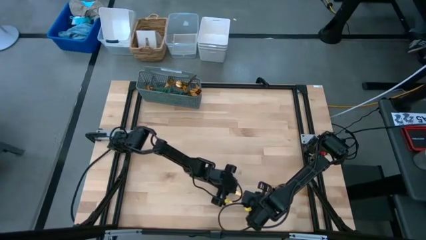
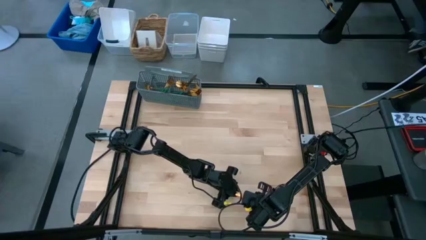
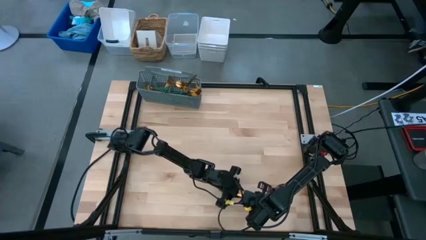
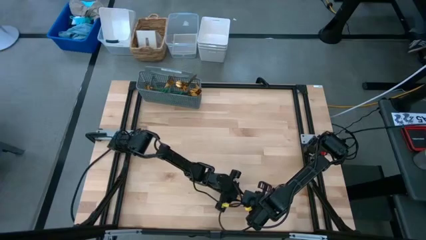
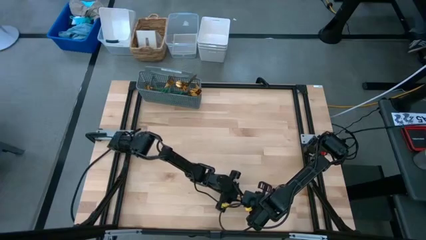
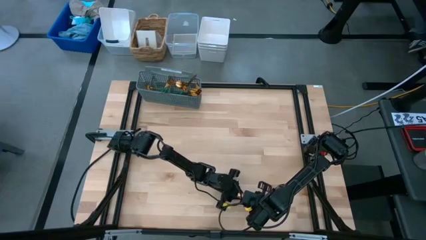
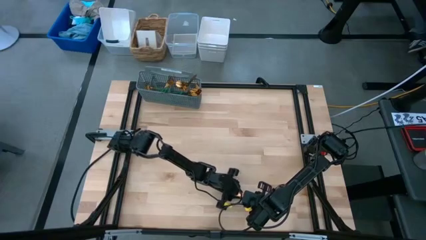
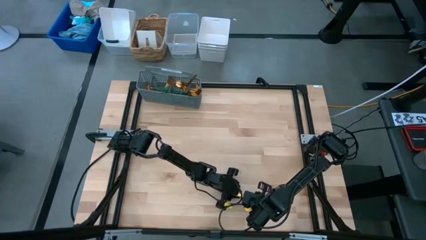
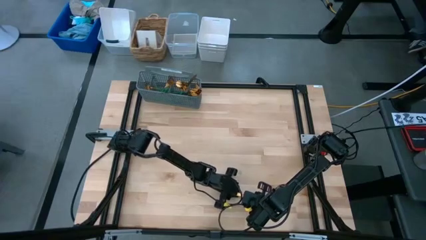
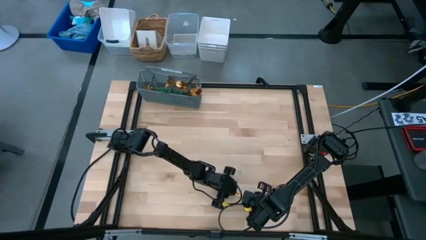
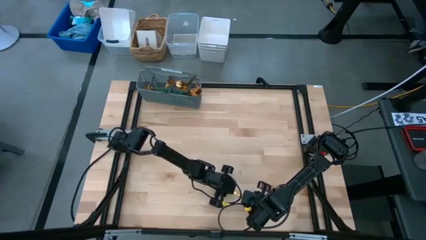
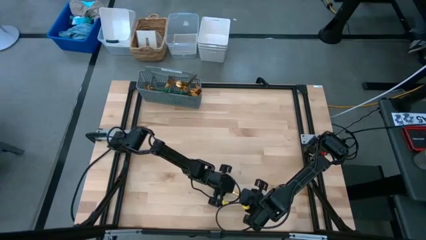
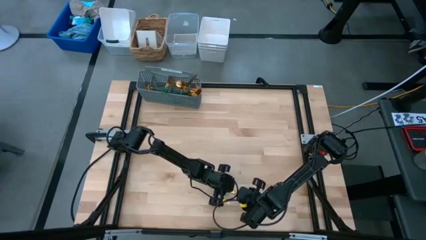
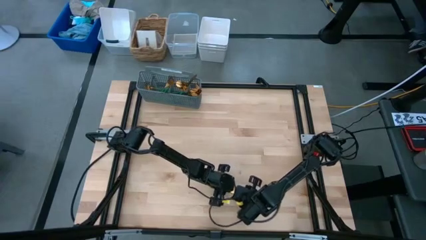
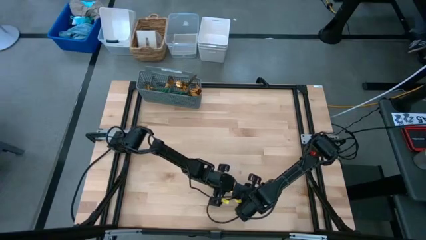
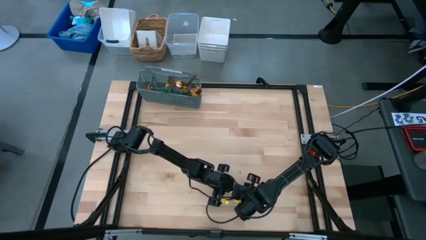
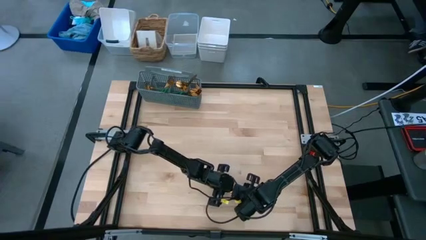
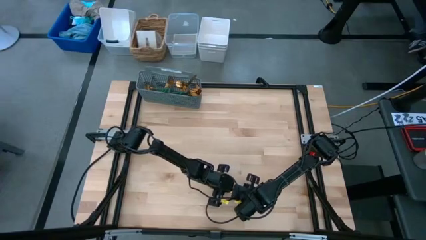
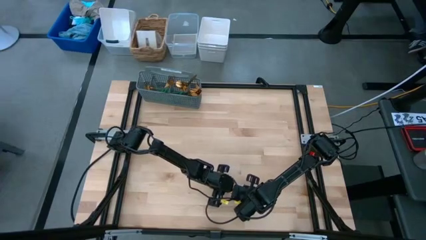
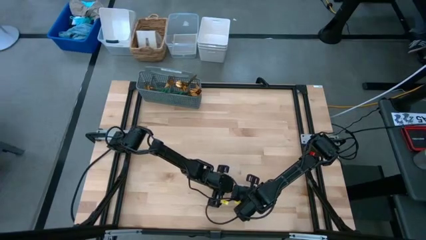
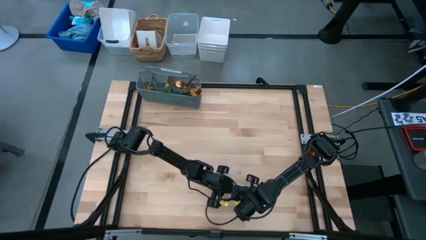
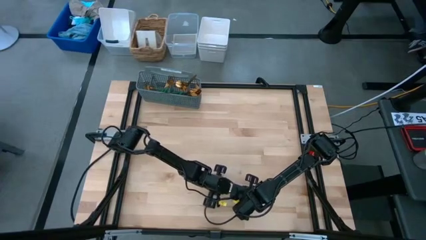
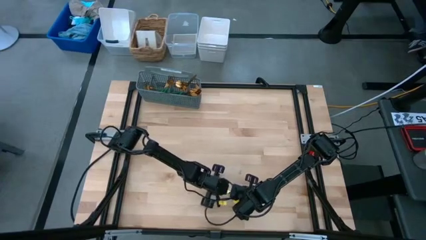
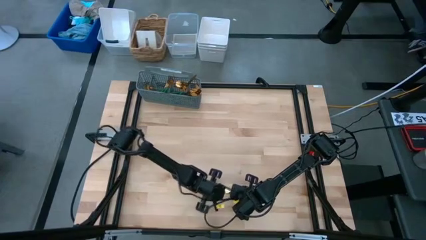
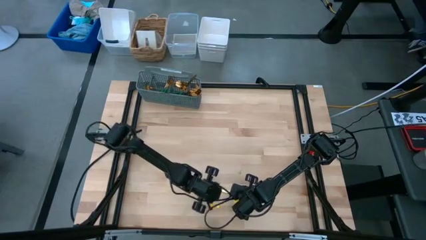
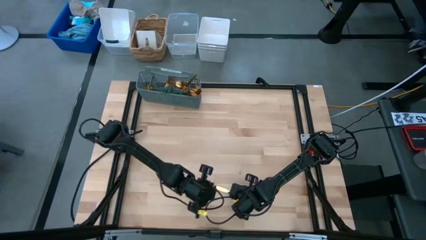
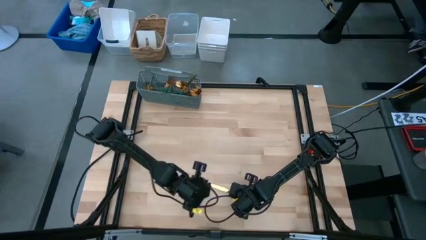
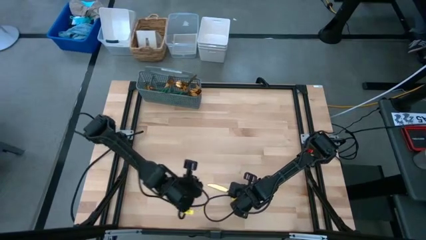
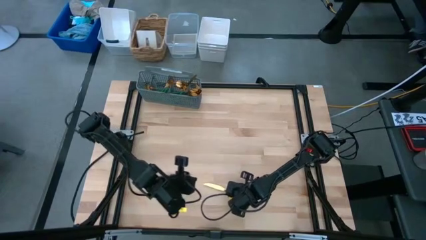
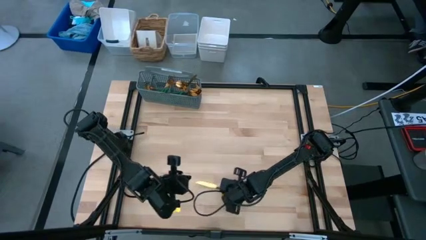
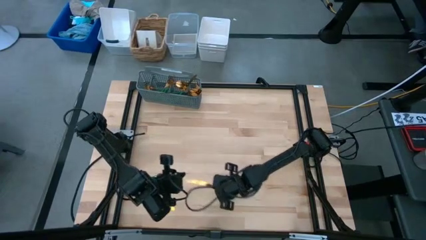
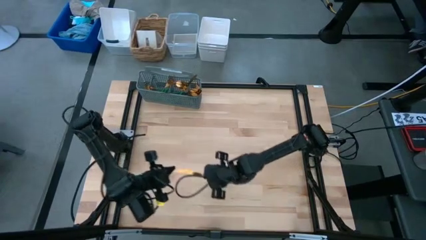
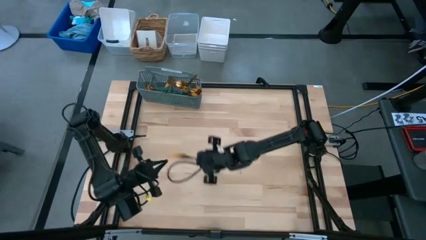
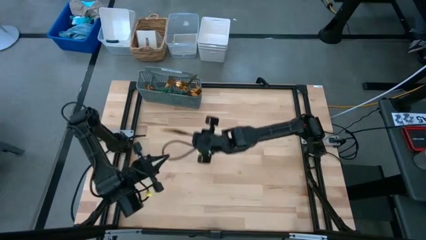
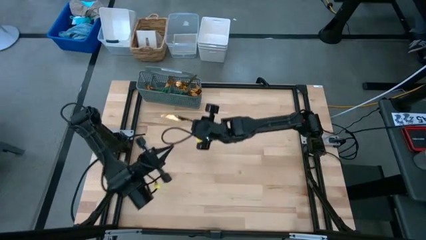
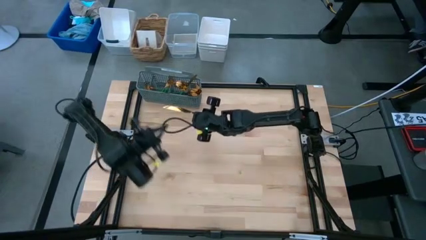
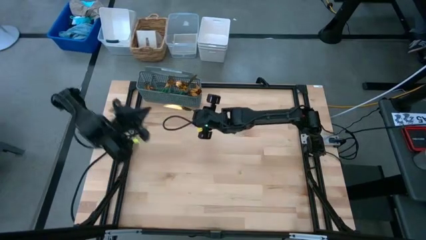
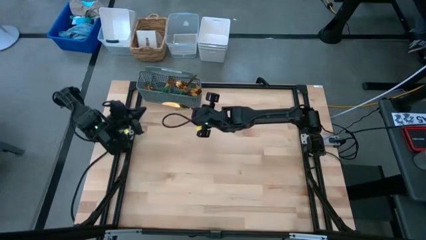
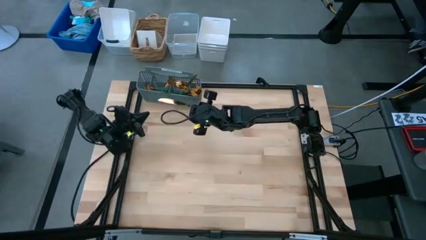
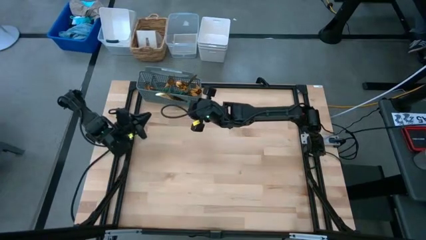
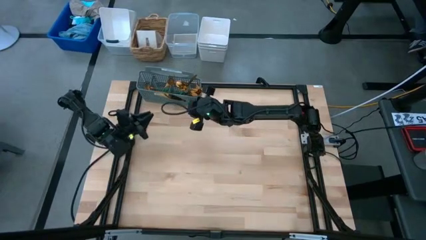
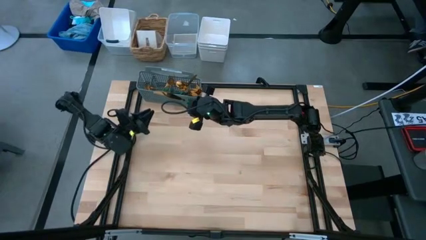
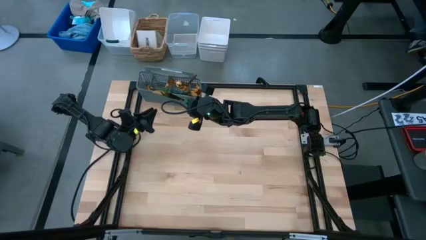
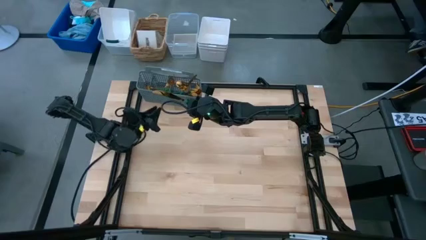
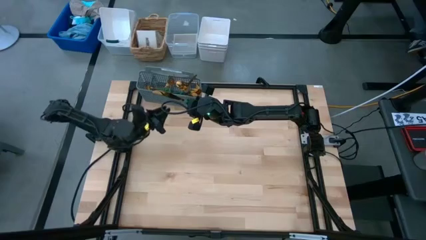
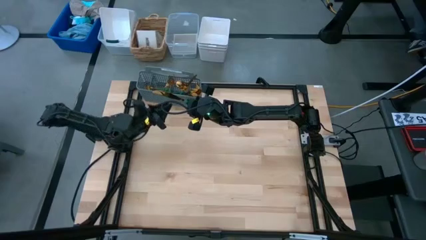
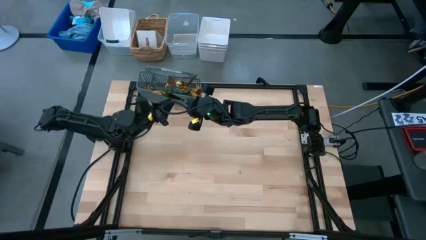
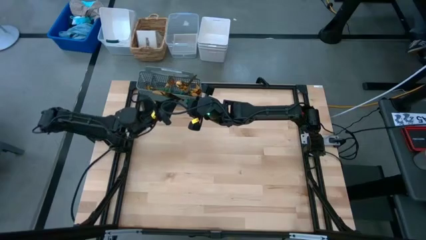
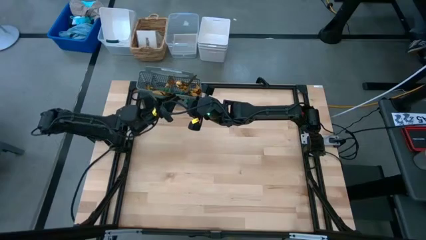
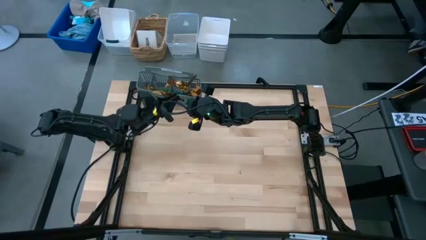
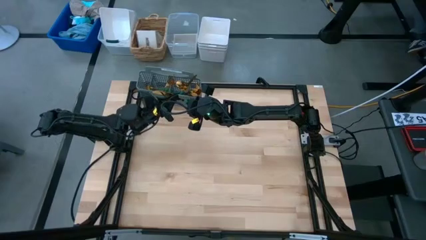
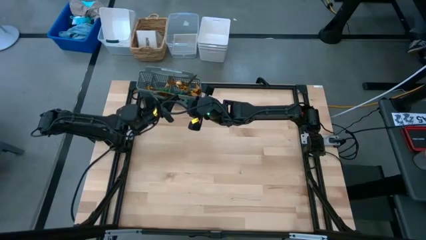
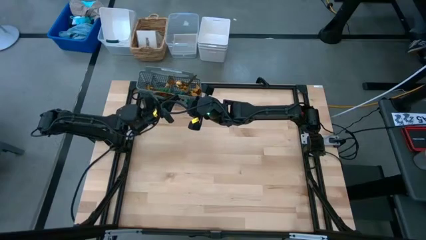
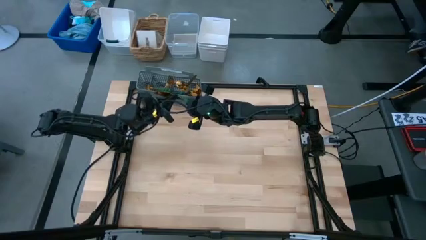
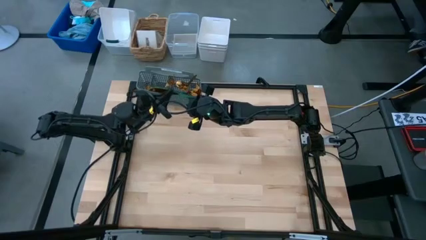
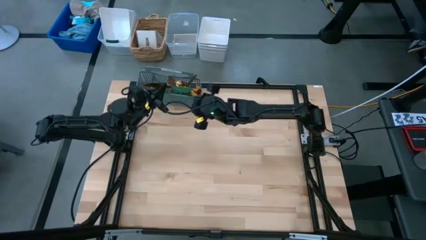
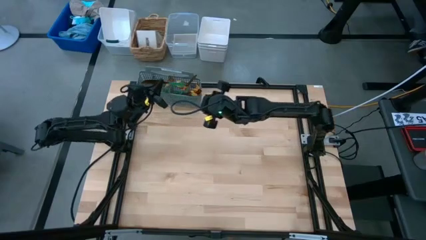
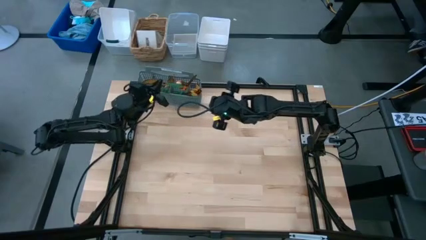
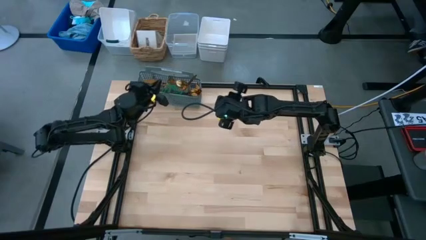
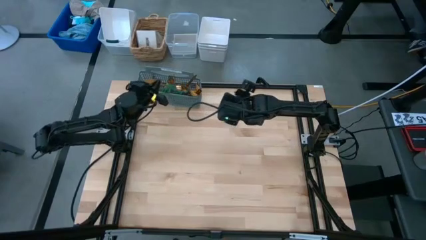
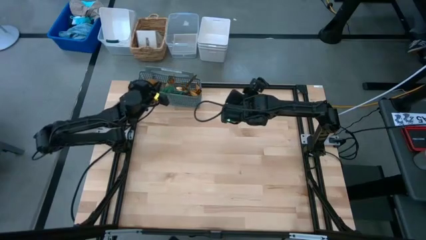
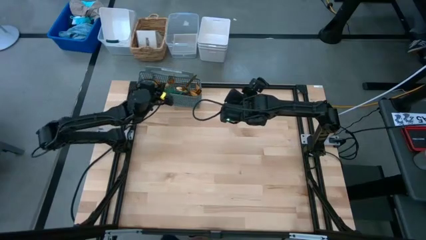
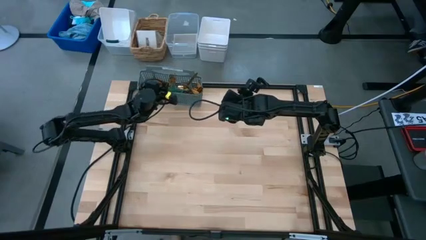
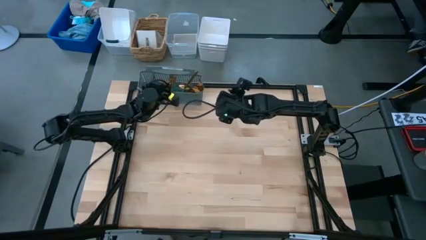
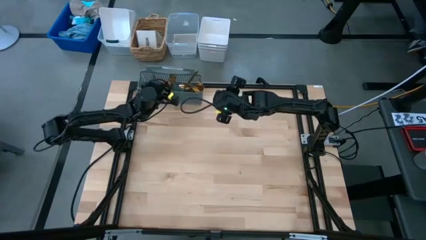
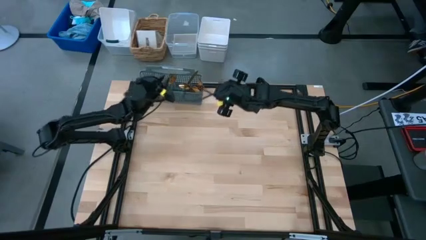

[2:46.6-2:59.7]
Task: Sort silverware
Put the green knife into the gray silverware basket

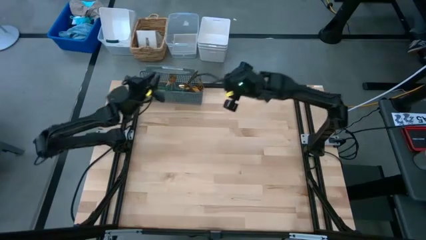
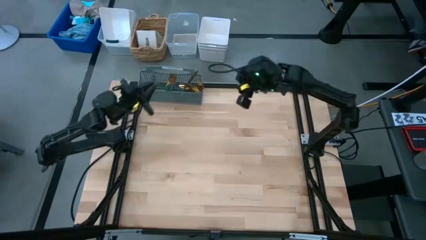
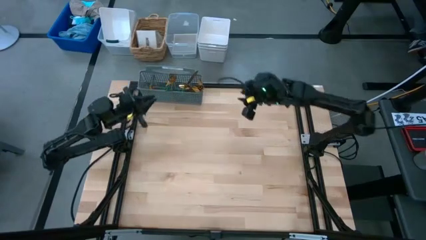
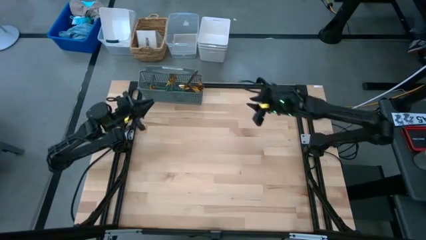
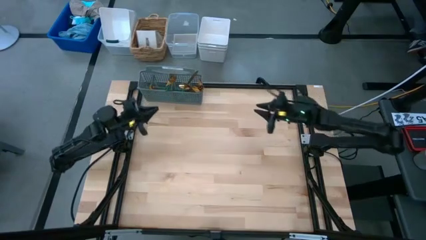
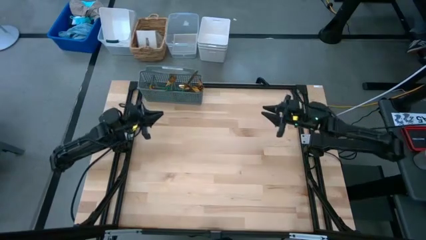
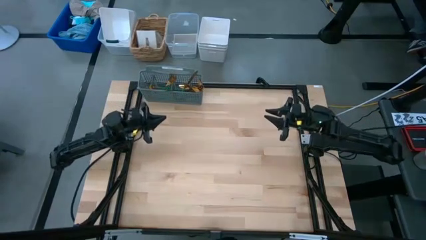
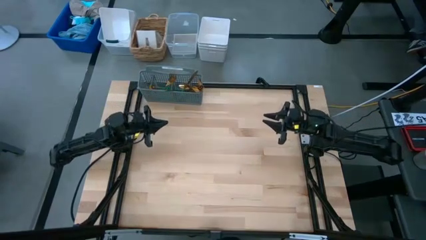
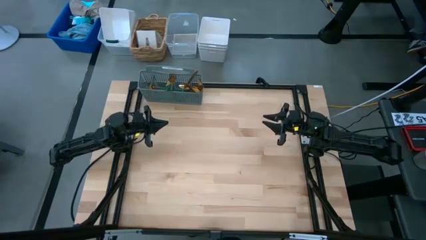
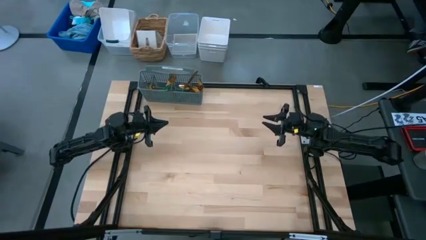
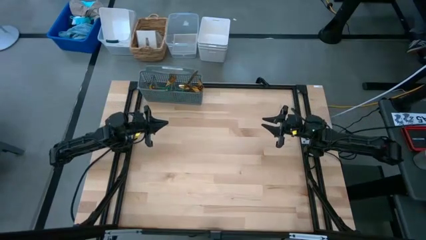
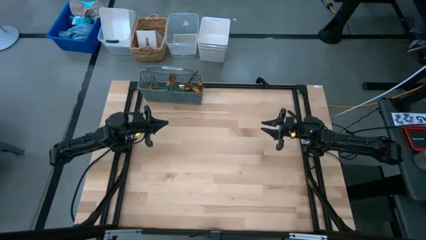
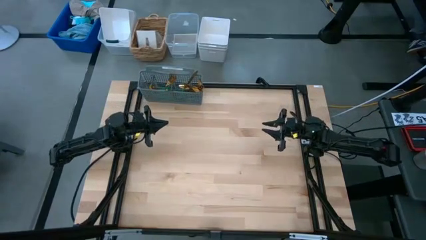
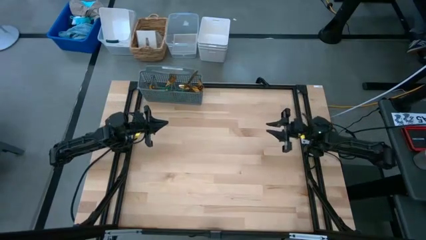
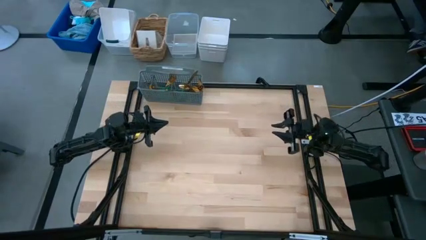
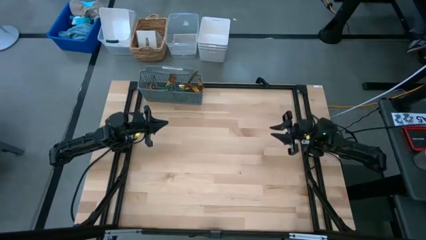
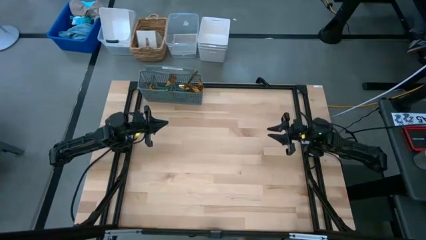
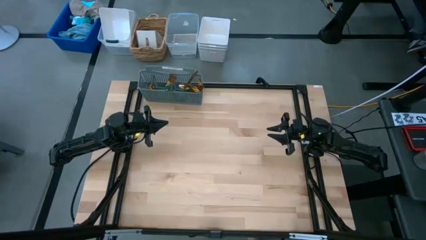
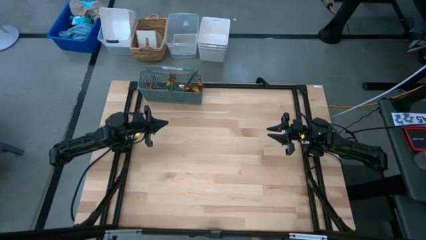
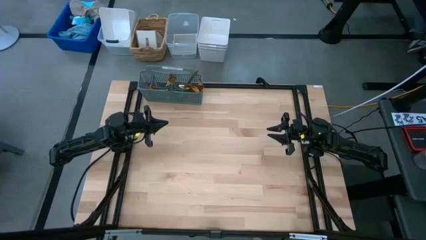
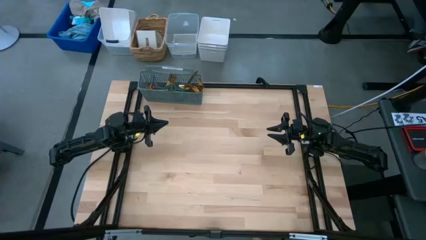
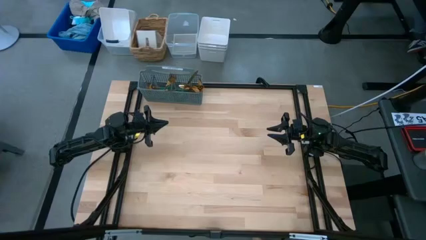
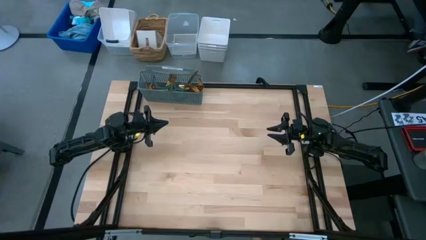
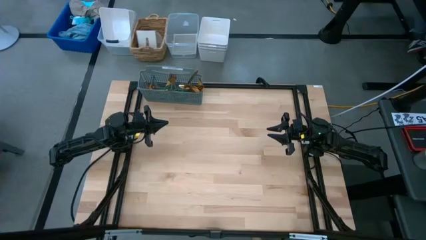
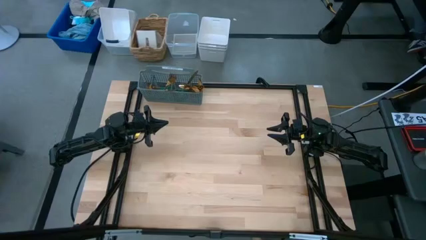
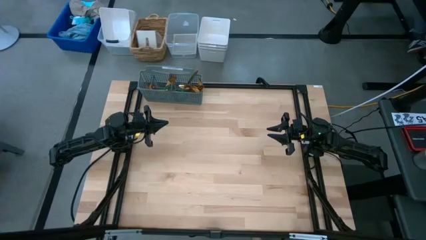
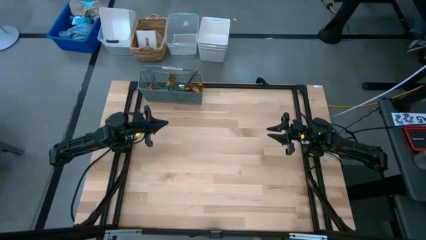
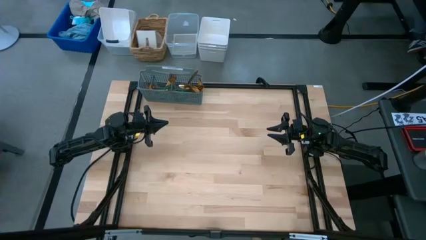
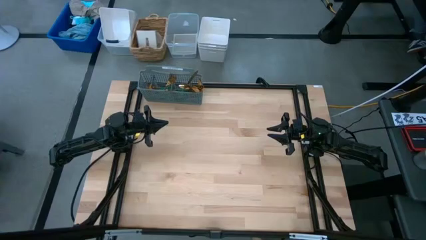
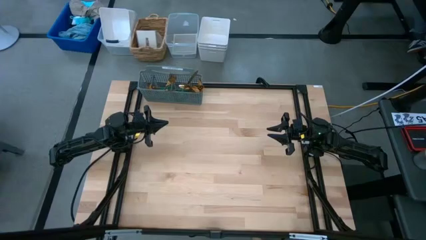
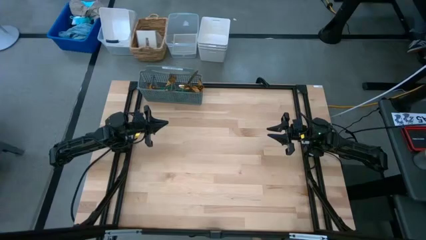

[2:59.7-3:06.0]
Return to Home Position
